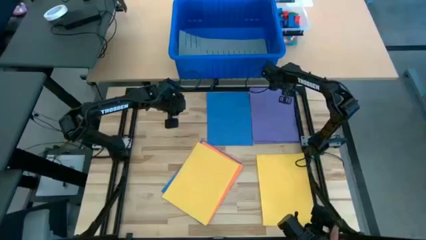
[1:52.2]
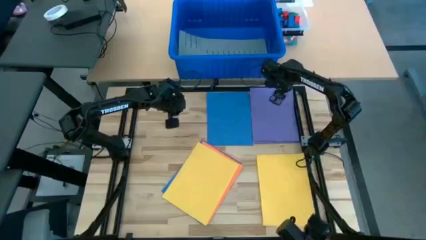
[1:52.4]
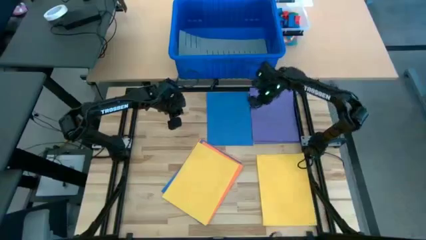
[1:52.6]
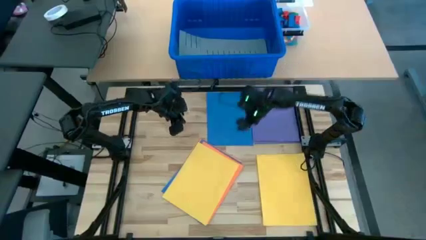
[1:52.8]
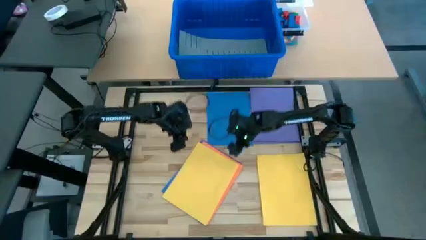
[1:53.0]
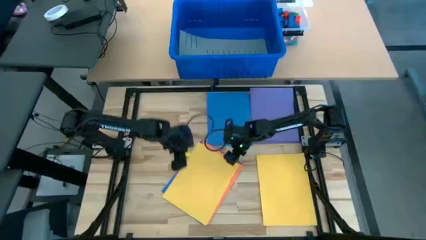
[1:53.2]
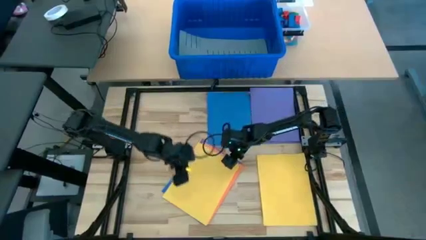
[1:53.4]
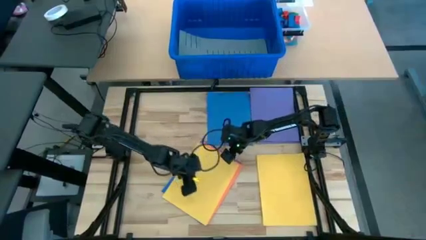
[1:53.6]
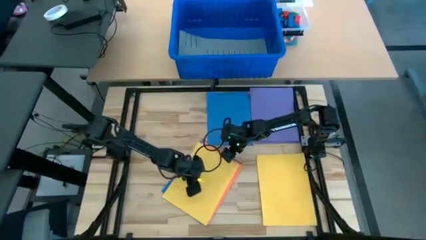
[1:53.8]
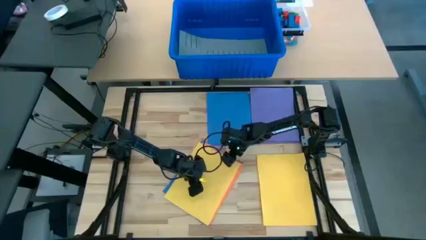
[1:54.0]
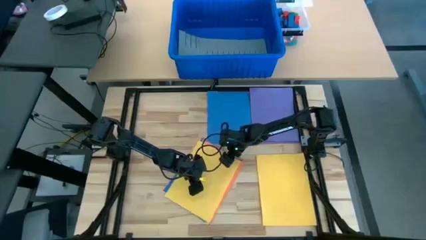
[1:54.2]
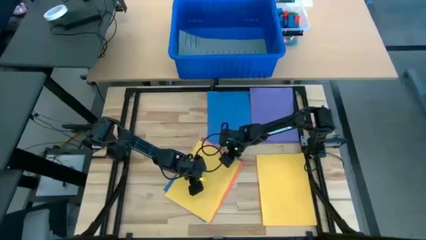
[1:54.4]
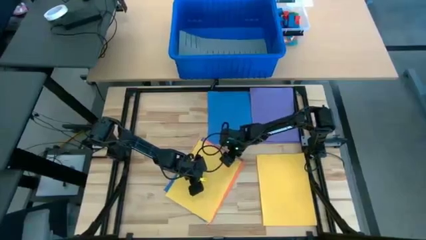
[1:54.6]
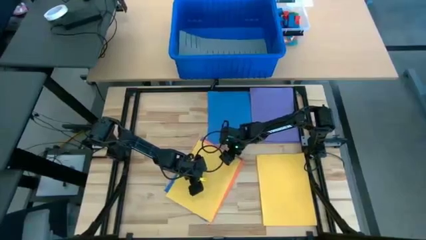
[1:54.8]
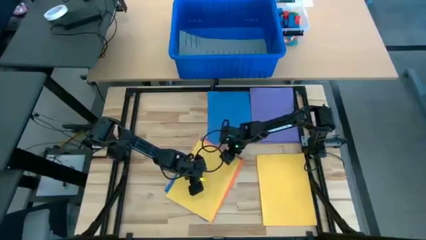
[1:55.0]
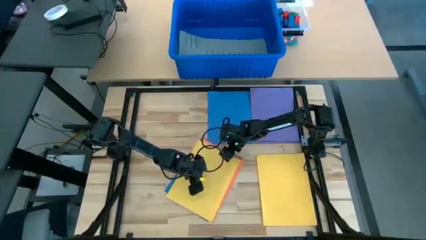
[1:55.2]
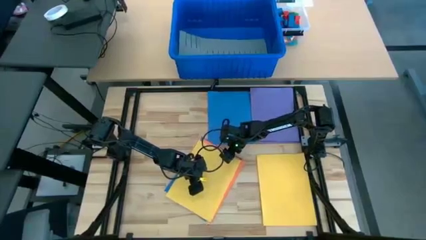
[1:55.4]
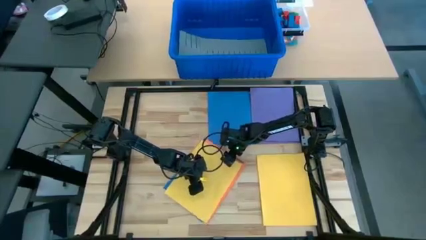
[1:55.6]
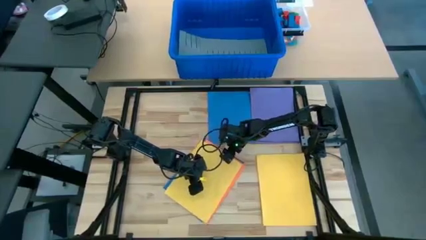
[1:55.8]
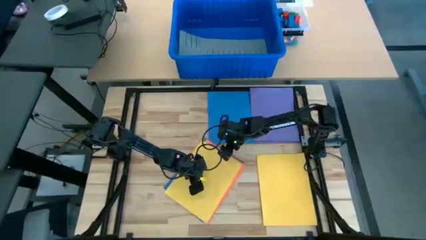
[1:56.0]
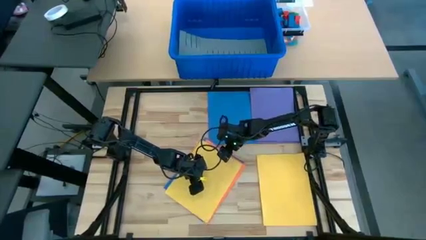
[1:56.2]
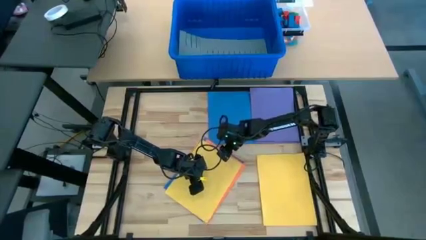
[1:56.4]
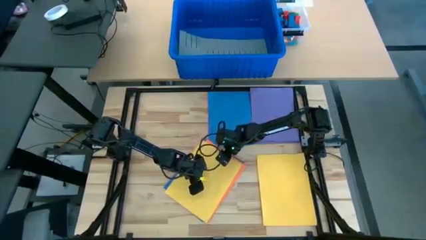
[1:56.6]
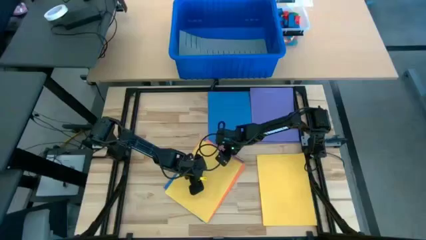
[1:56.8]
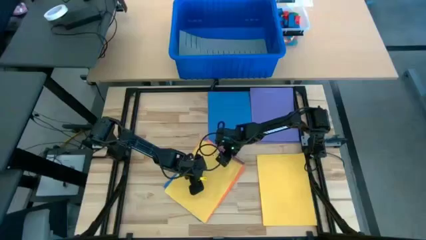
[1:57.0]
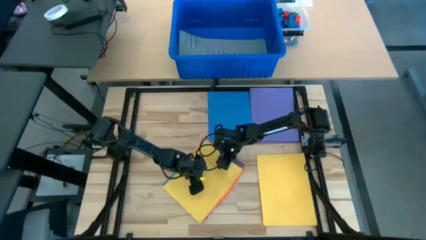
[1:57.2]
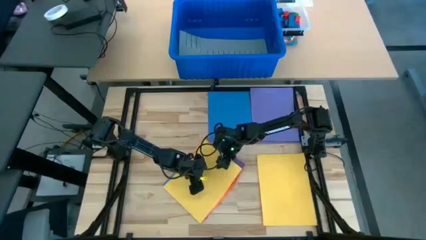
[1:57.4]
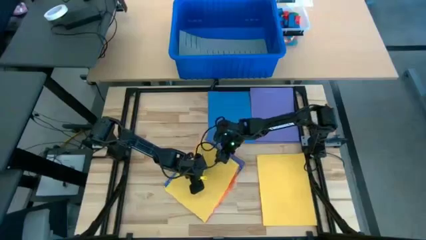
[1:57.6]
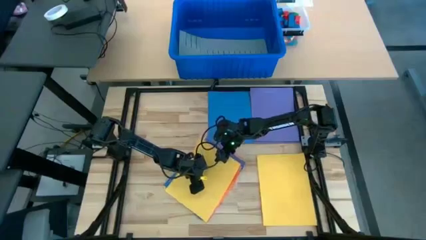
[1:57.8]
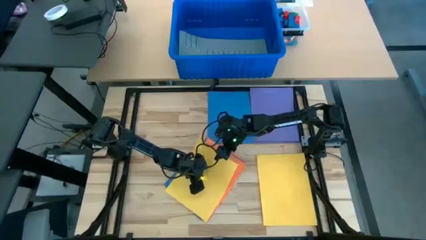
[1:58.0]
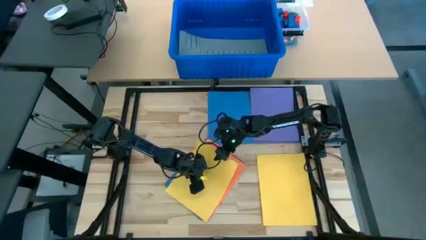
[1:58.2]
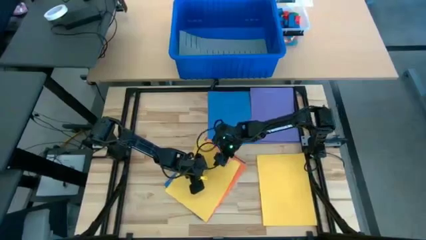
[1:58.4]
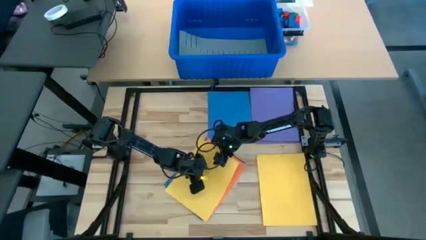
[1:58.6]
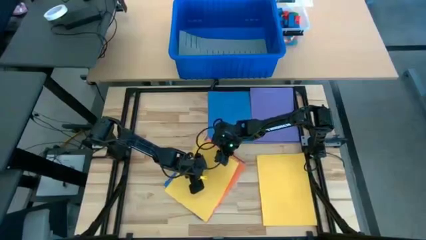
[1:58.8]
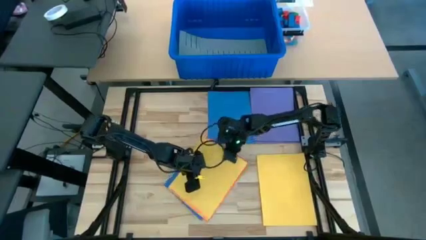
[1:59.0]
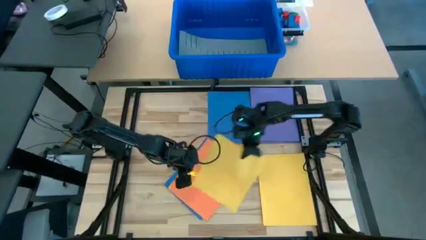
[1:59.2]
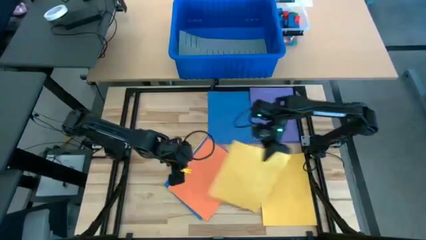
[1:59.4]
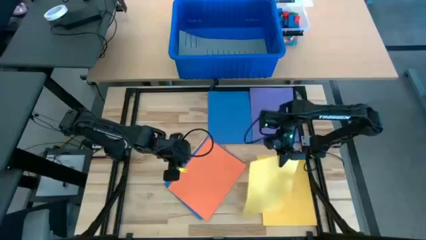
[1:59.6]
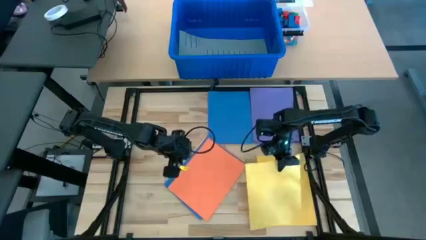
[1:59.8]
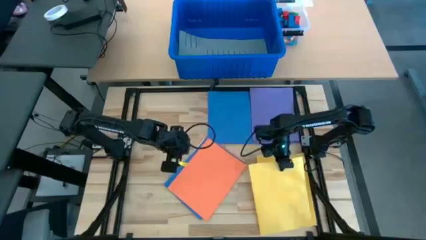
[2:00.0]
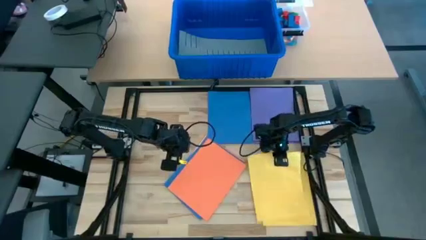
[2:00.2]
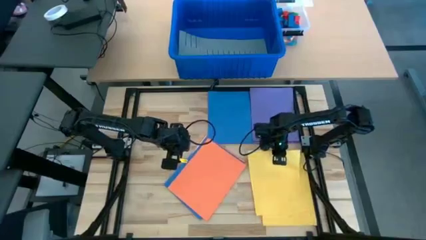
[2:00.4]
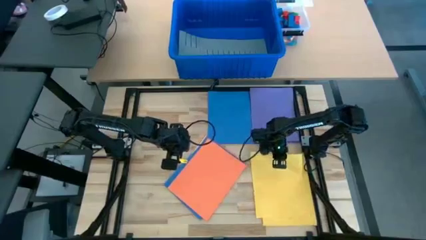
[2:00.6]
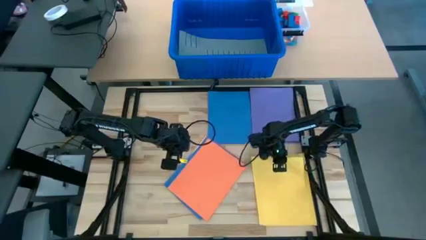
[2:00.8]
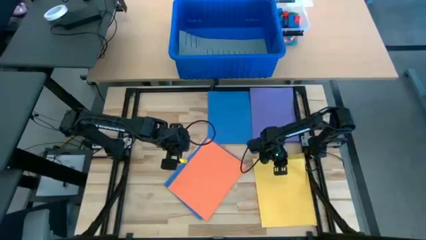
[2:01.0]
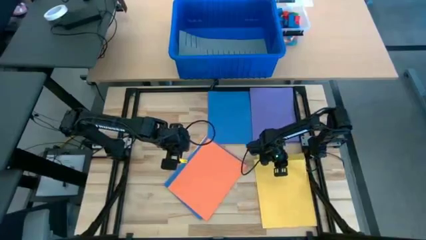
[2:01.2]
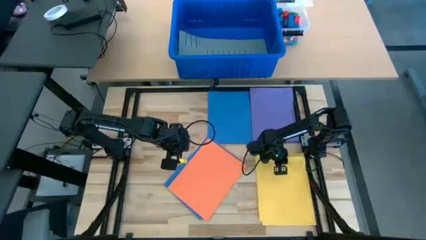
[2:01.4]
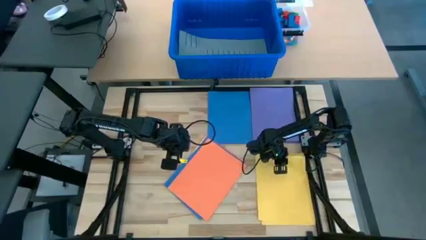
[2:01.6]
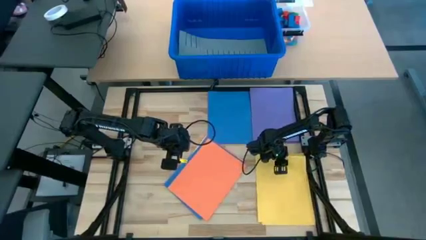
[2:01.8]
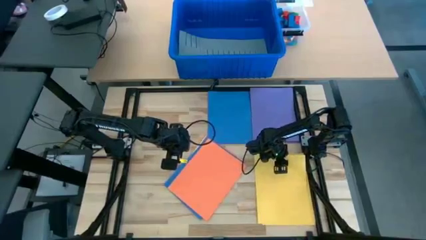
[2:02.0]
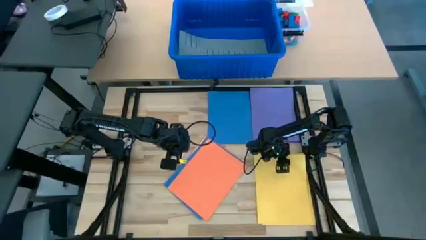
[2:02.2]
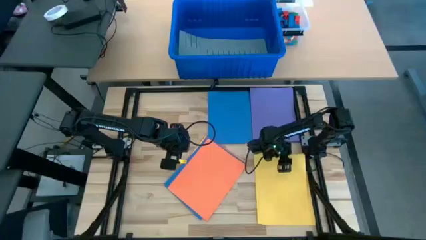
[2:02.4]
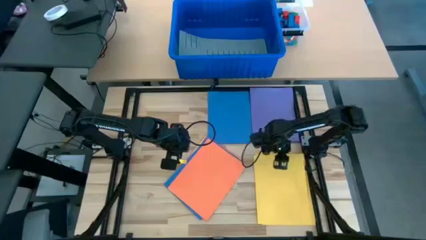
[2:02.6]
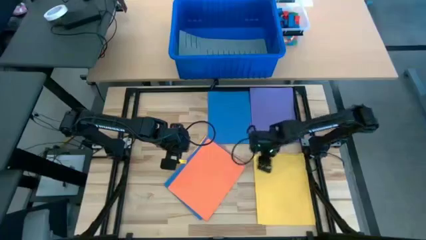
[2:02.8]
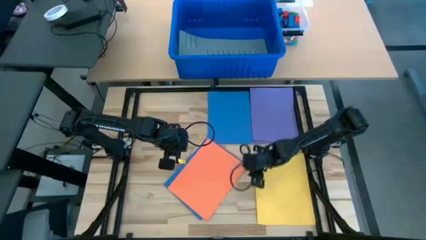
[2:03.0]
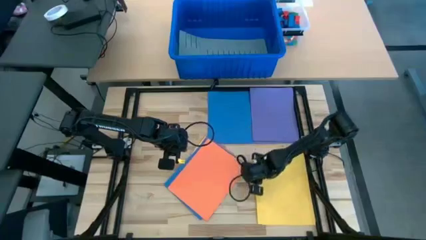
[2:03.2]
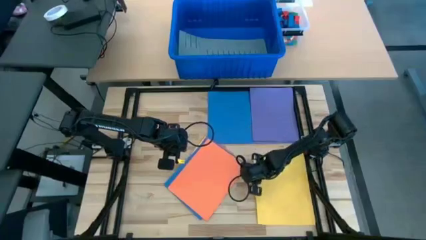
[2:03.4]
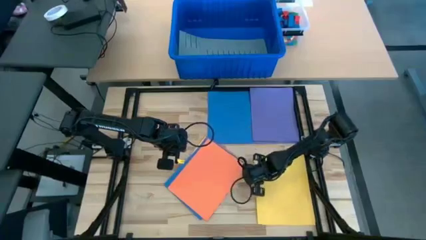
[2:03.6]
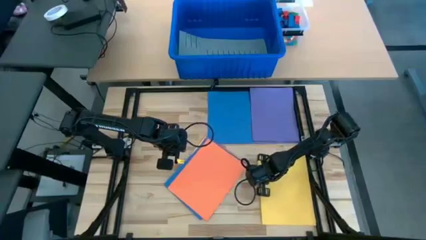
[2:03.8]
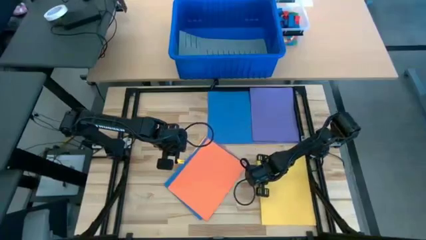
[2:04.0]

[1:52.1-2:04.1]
Task: Organize paper
Stack the yellow paper on top of the other yellow papers

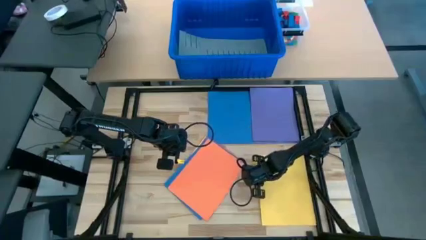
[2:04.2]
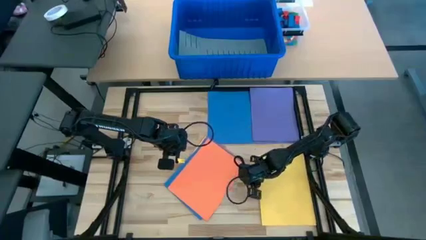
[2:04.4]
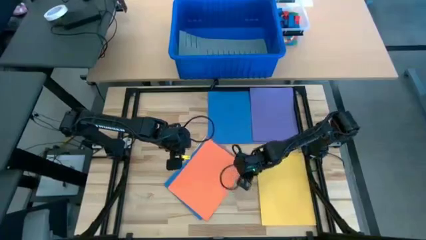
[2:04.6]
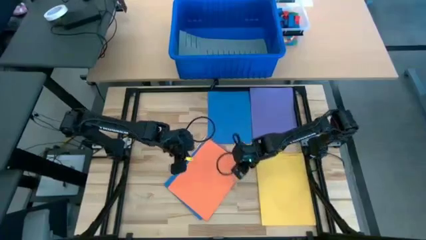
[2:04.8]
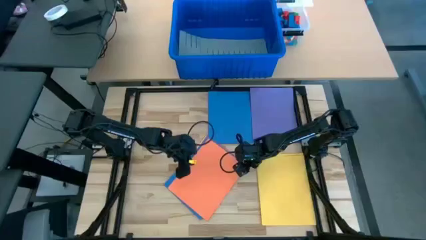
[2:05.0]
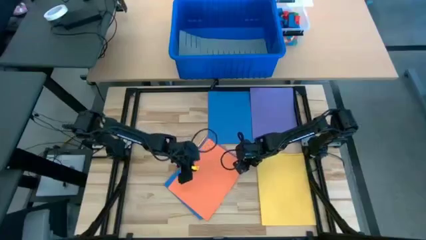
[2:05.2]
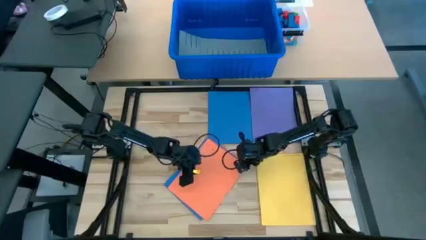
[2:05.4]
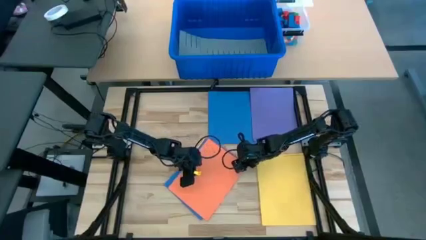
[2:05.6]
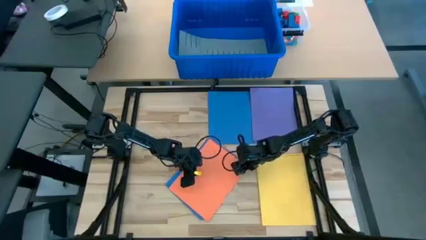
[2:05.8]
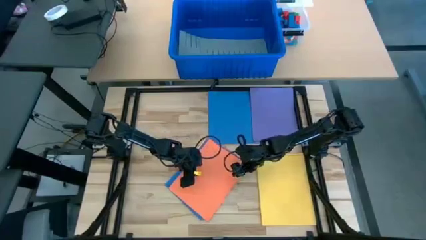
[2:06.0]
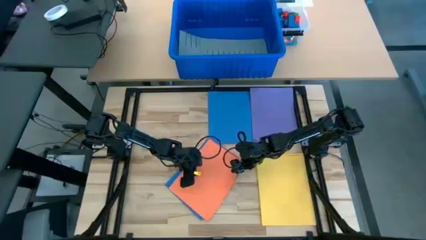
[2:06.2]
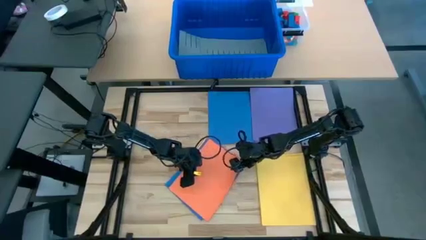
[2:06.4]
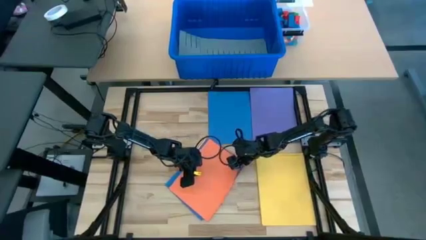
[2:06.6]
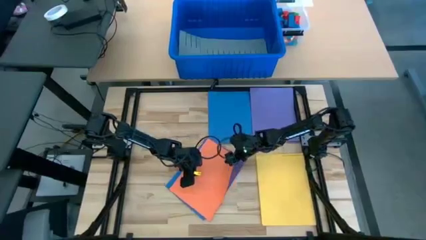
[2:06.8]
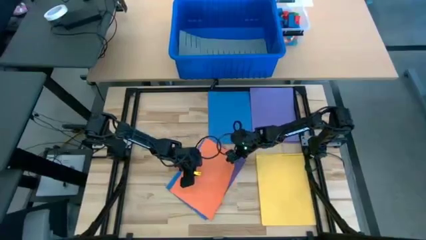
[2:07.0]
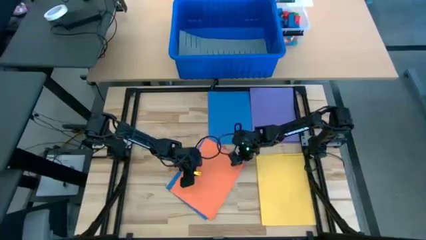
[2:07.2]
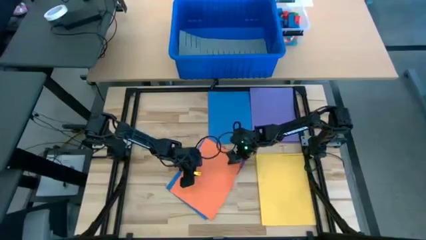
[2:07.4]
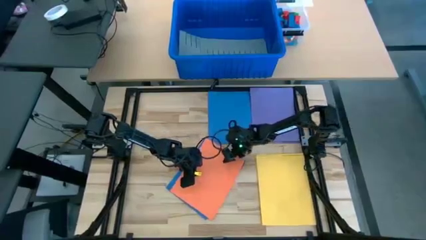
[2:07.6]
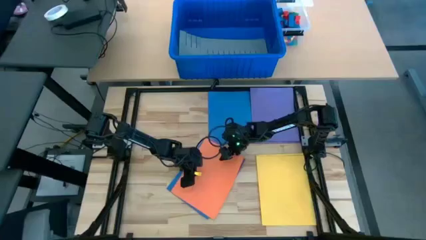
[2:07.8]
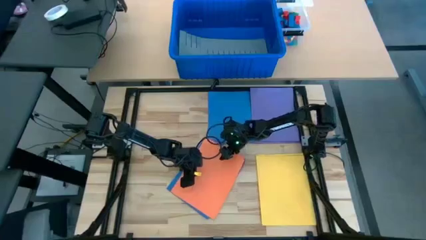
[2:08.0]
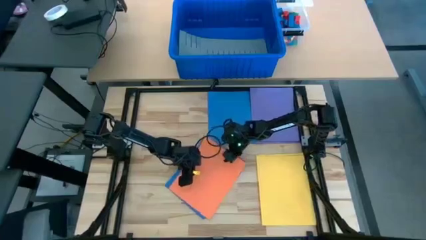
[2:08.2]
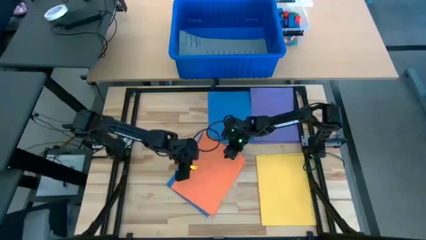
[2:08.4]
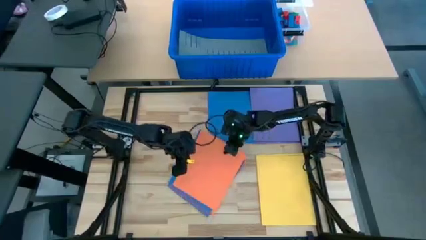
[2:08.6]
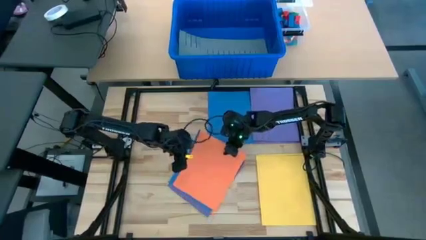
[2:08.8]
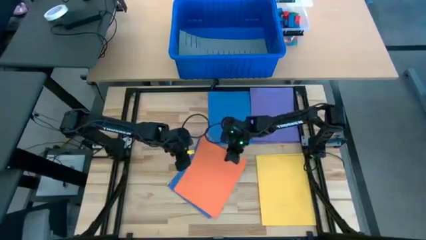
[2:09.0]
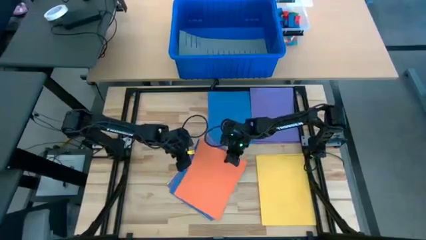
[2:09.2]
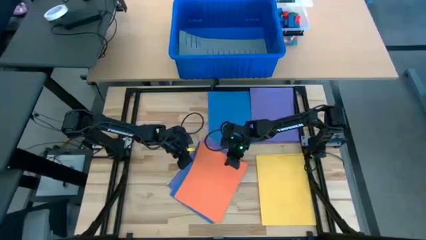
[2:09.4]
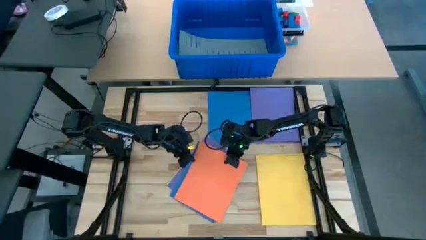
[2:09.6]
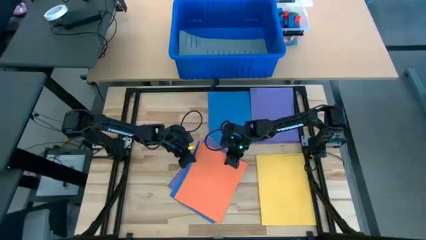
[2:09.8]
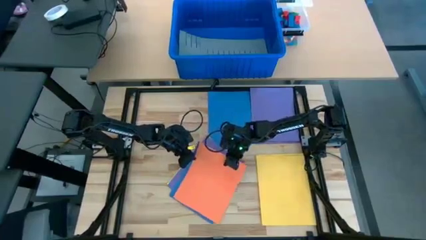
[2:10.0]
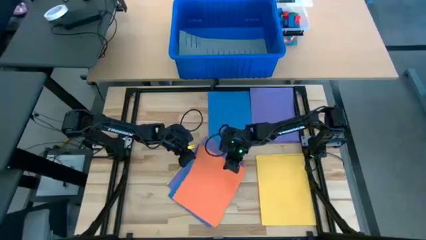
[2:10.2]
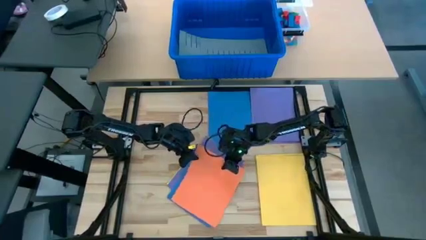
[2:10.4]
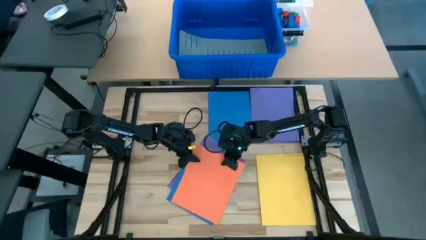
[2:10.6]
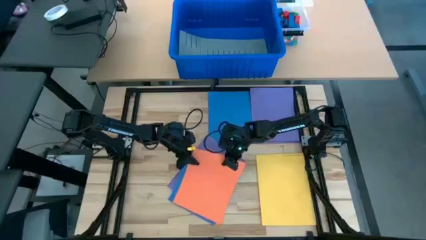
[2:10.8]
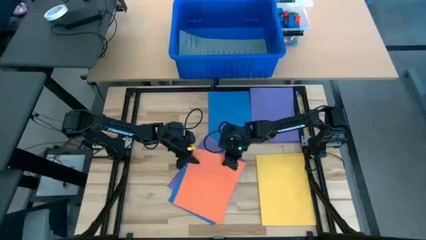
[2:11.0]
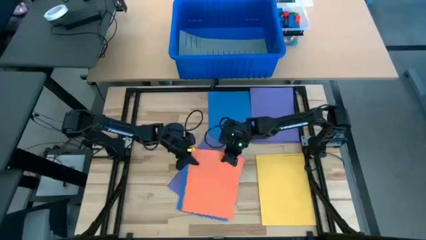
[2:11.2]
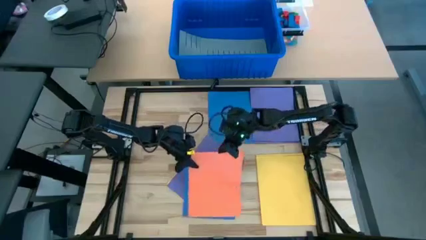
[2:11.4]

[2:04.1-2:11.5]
Put the orange paper on the table
